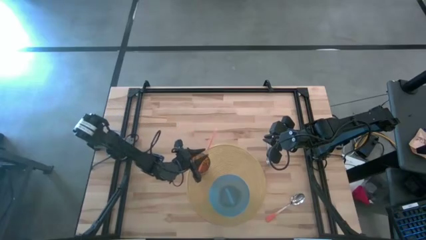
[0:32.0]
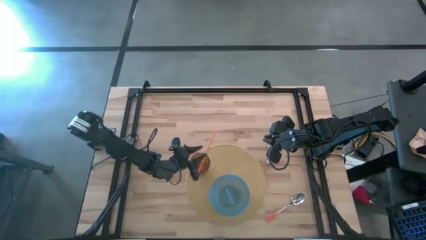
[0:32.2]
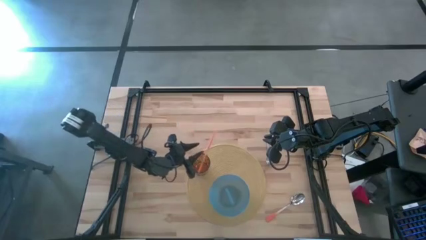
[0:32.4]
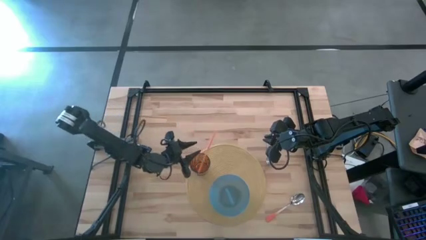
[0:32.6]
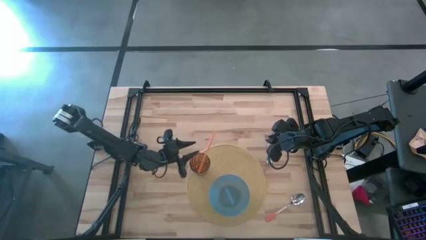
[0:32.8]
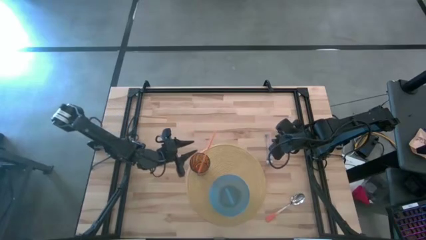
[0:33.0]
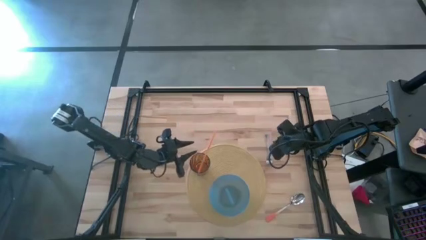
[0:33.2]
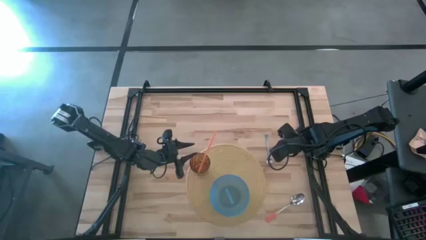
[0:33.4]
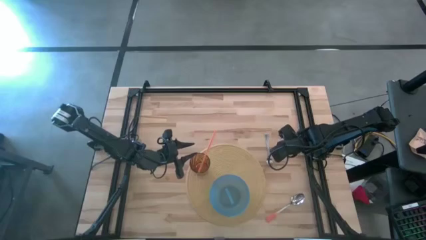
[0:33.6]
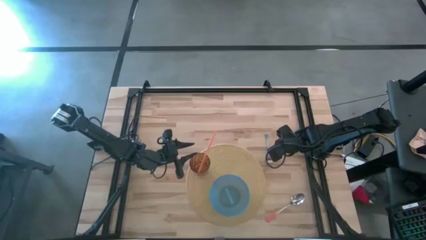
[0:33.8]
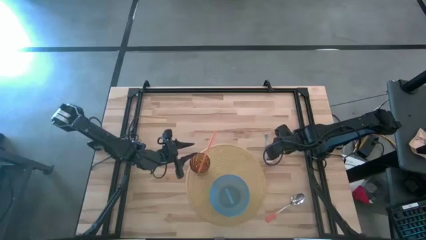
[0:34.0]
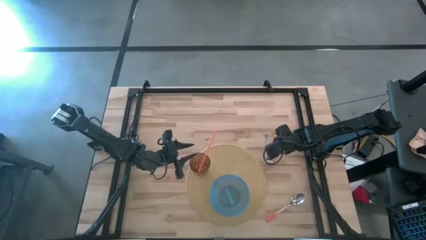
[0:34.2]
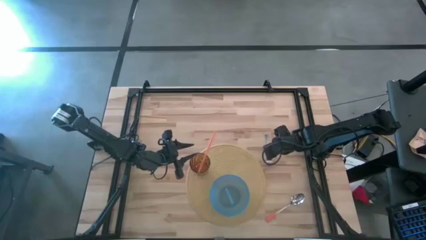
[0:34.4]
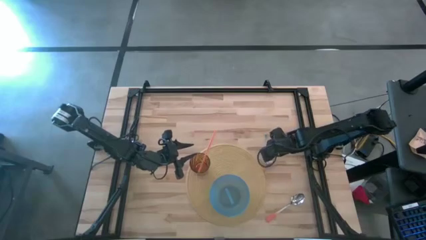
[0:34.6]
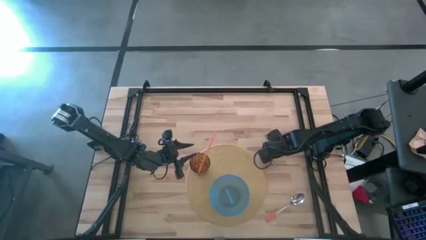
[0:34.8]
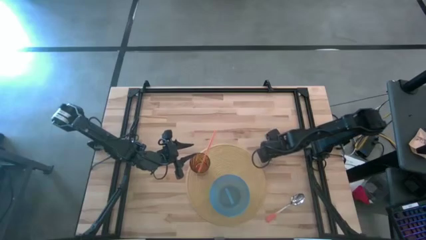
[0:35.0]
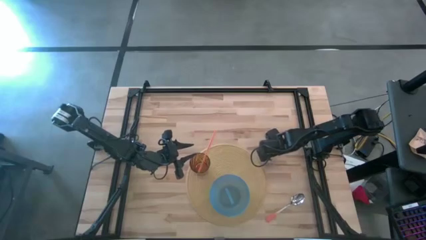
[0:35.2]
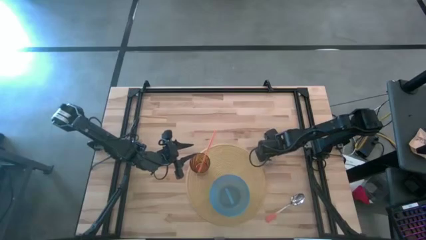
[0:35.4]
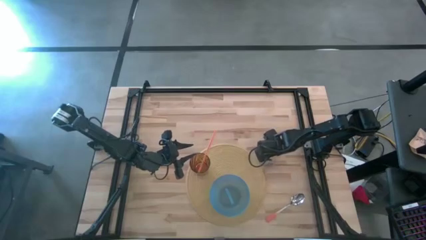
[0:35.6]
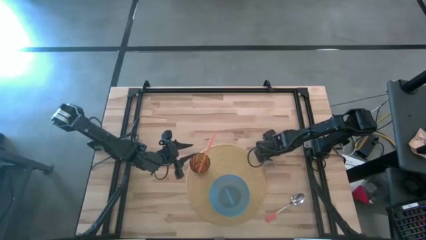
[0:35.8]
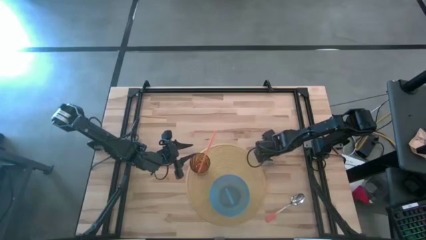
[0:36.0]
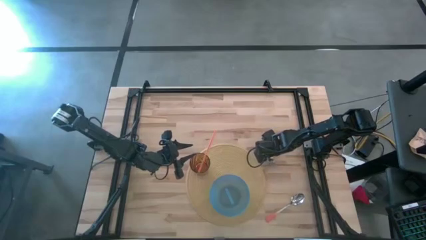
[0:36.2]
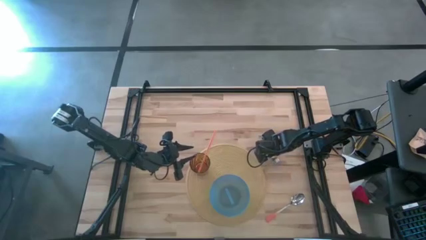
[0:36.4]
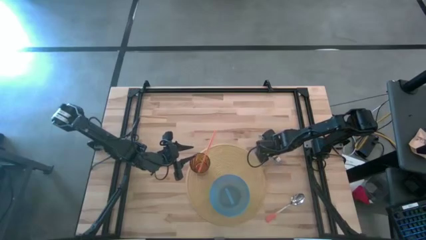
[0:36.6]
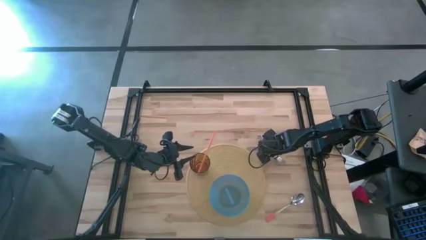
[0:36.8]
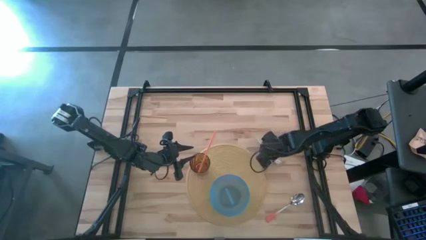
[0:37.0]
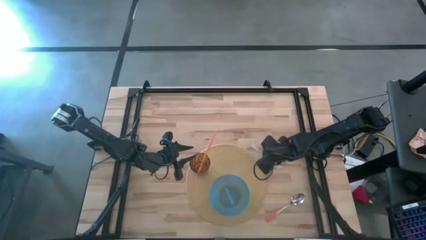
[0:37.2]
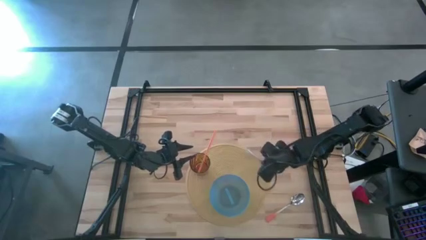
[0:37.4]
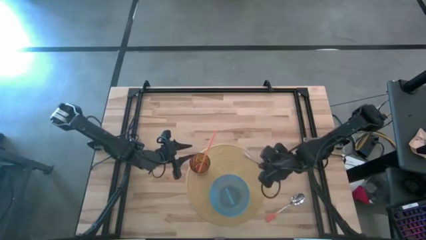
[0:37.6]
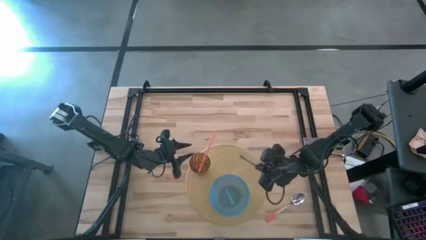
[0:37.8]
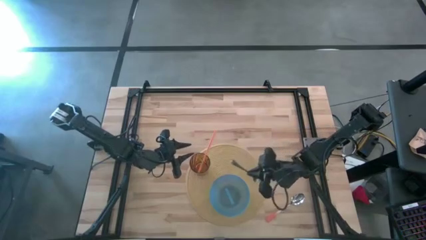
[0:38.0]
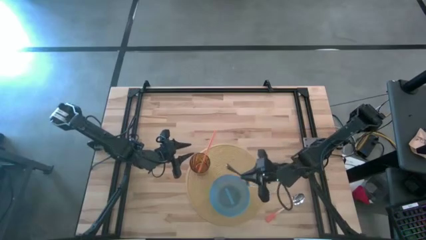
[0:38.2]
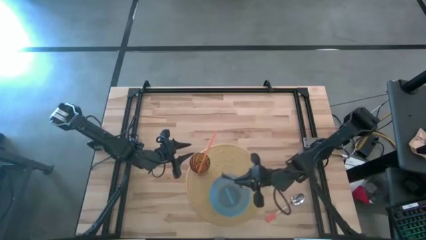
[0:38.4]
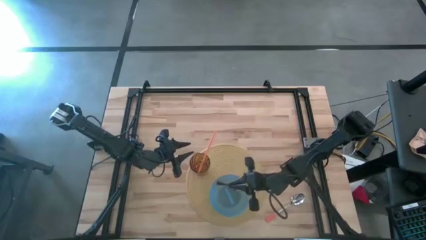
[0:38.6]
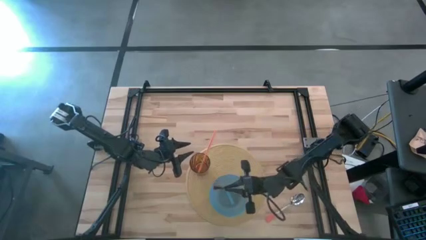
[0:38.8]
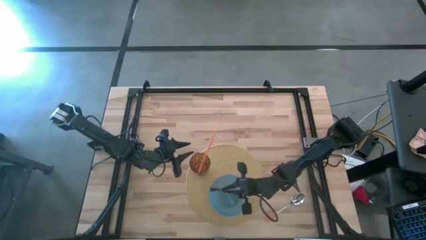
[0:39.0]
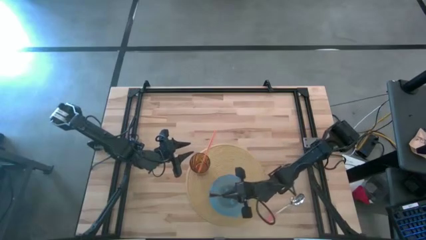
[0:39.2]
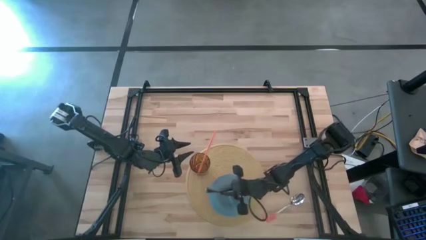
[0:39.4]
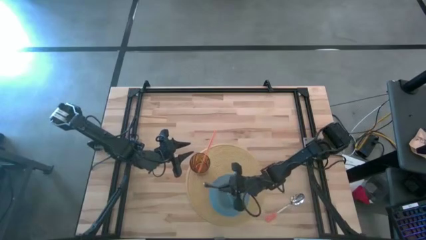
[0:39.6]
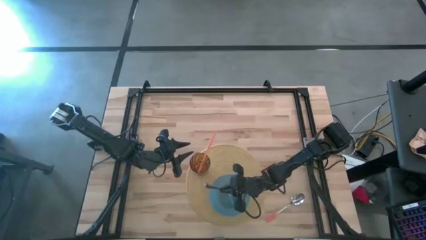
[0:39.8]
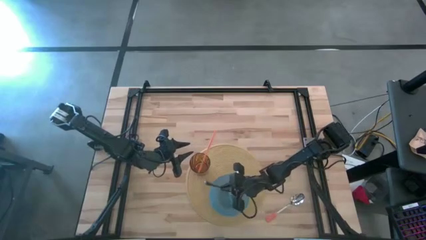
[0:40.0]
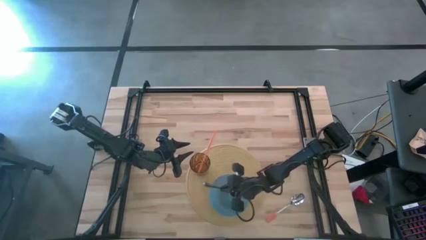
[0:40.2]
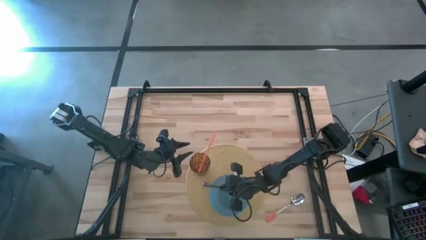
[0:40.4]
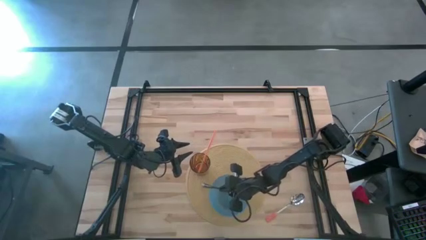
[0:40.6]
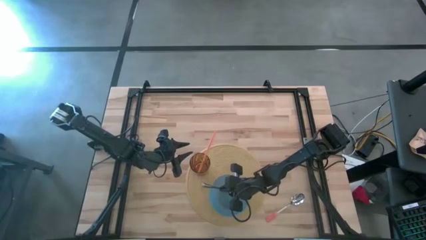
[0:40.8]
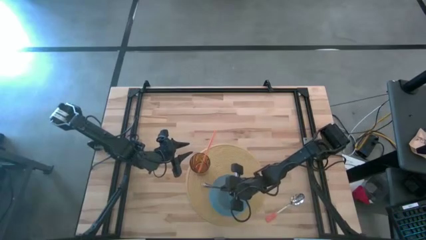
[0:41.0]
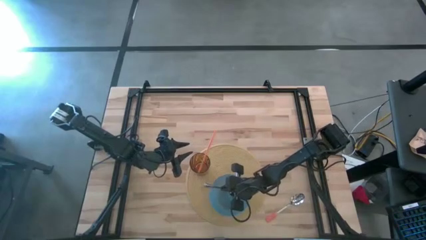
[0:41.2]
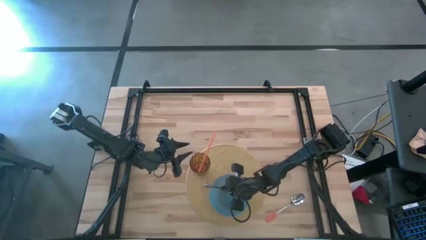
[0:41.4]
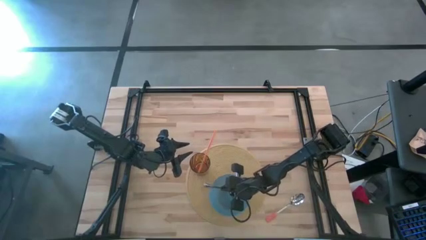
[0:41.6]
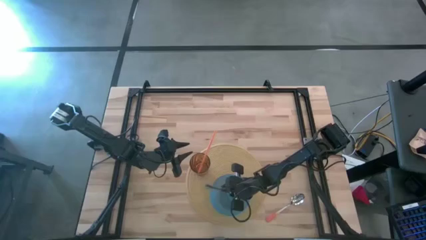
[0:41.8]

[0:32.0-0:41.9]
Task: Pick & Place Utensil
Put the silver fork into the blue bowl on the brown mat
